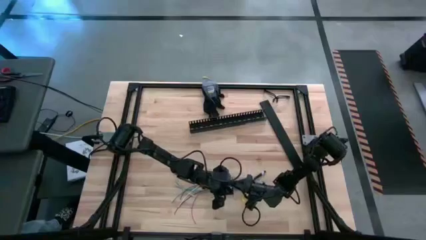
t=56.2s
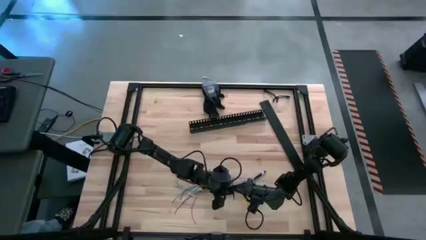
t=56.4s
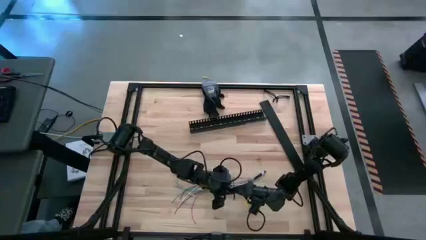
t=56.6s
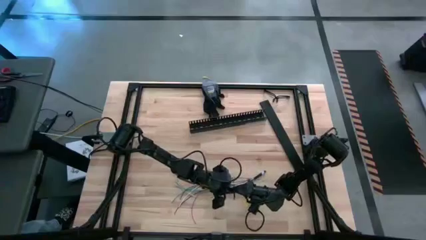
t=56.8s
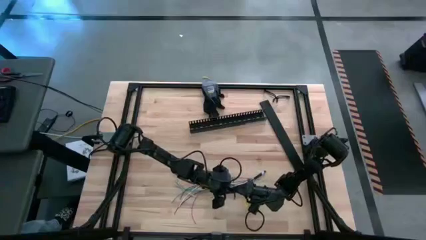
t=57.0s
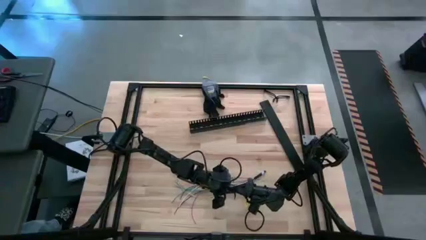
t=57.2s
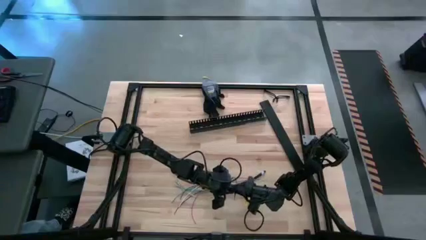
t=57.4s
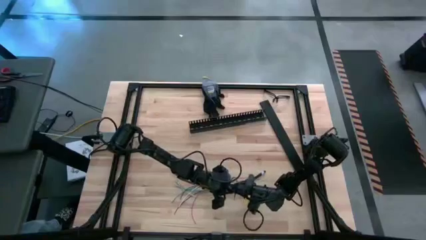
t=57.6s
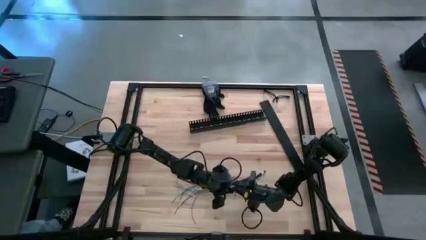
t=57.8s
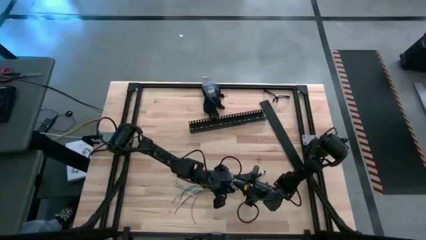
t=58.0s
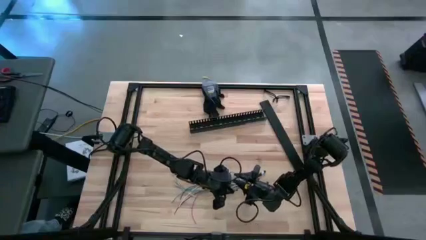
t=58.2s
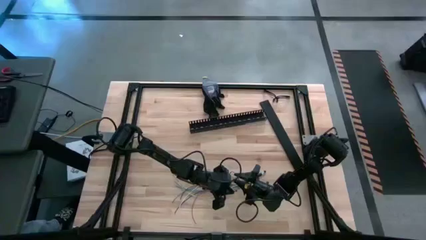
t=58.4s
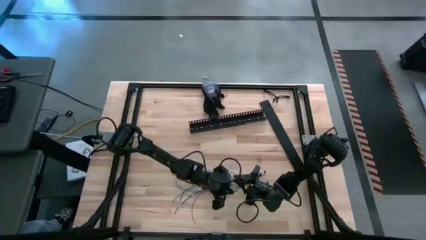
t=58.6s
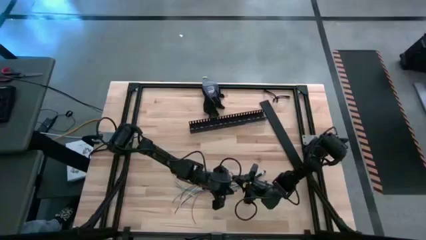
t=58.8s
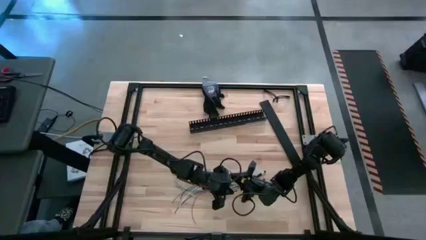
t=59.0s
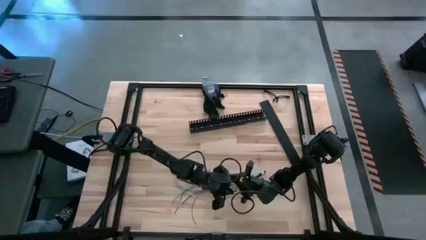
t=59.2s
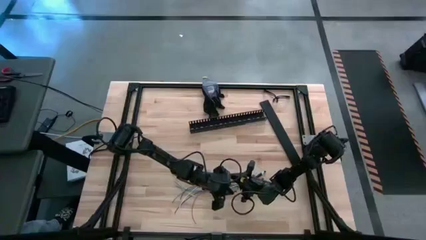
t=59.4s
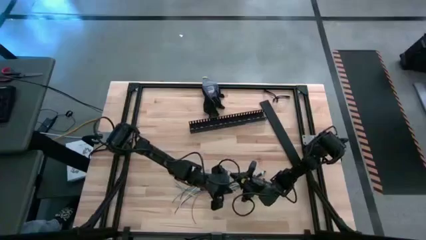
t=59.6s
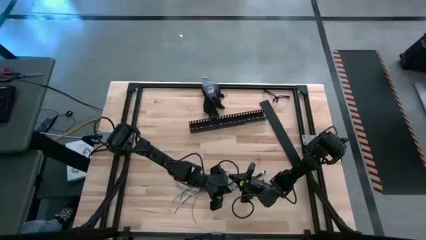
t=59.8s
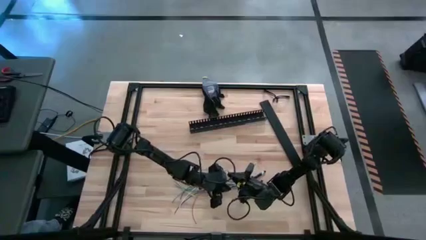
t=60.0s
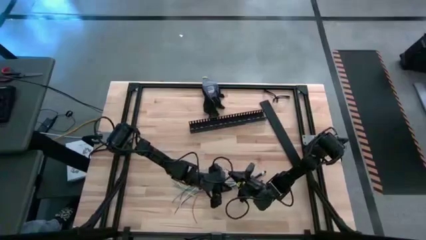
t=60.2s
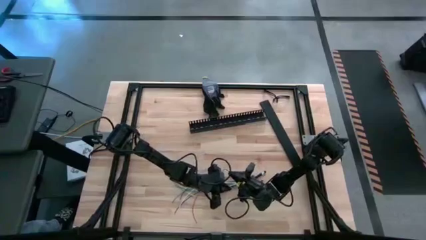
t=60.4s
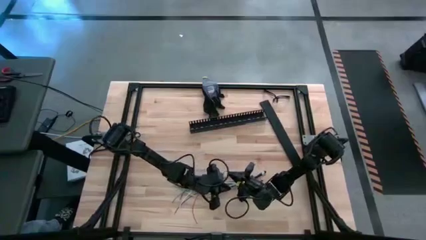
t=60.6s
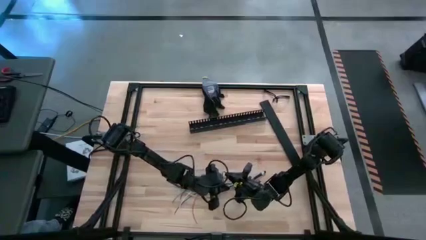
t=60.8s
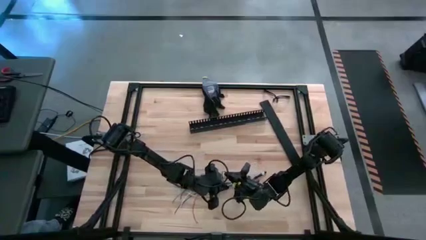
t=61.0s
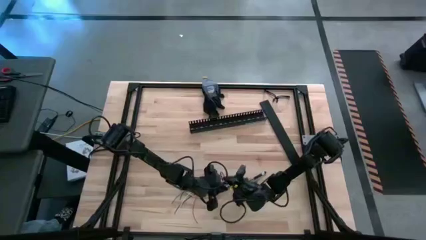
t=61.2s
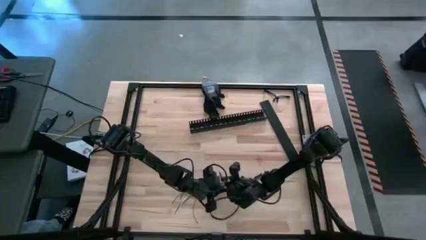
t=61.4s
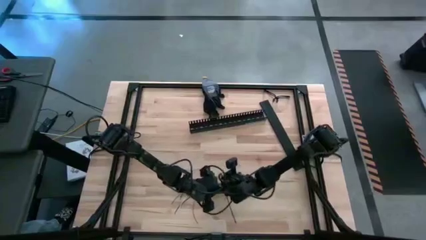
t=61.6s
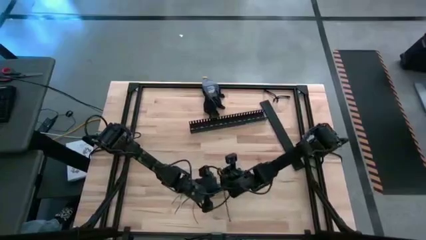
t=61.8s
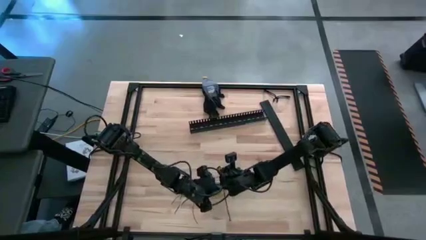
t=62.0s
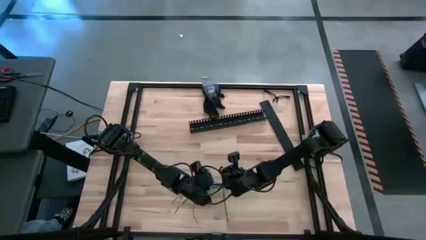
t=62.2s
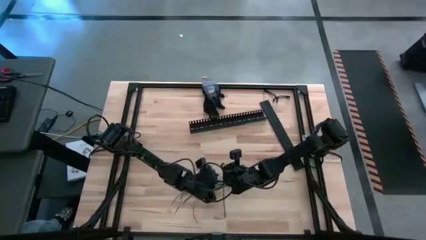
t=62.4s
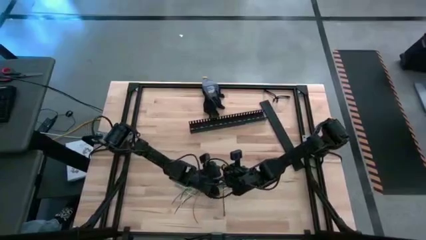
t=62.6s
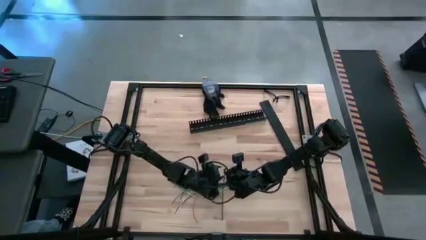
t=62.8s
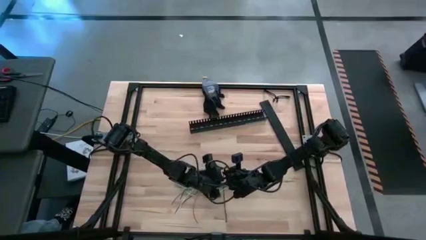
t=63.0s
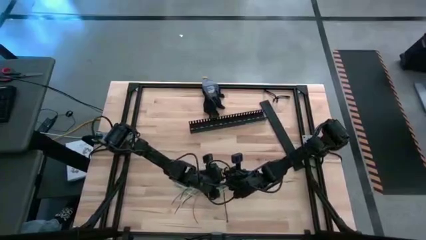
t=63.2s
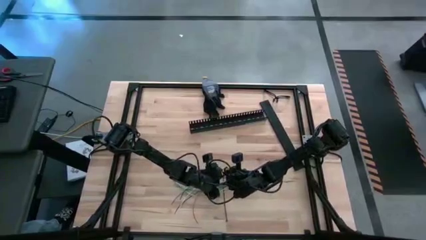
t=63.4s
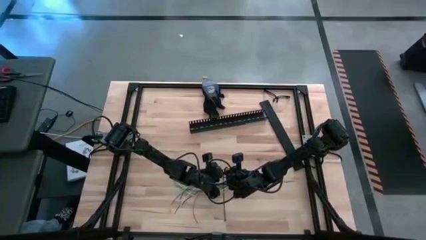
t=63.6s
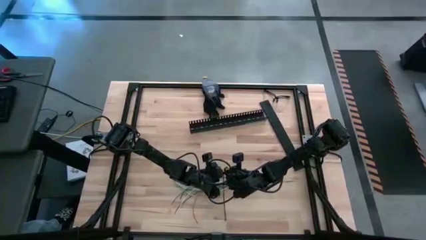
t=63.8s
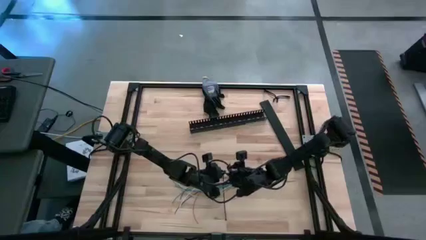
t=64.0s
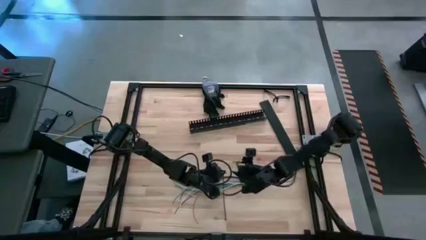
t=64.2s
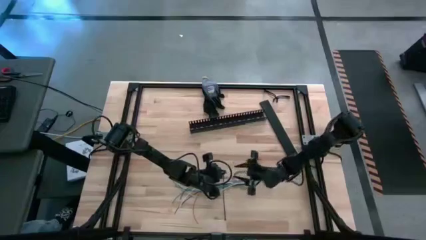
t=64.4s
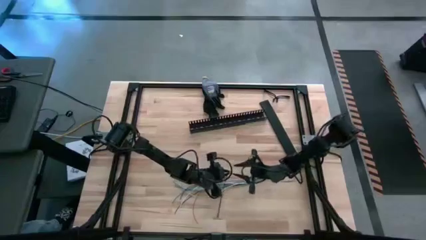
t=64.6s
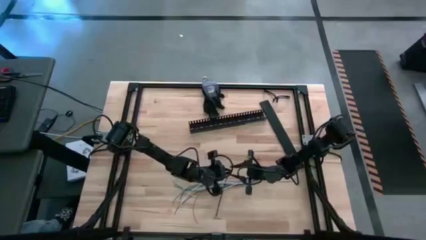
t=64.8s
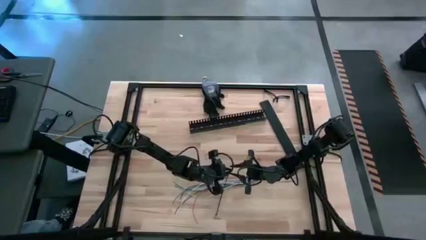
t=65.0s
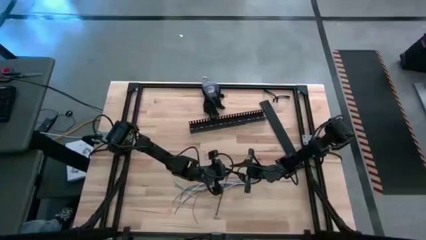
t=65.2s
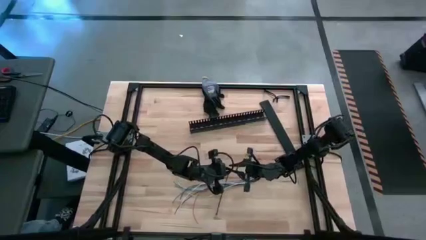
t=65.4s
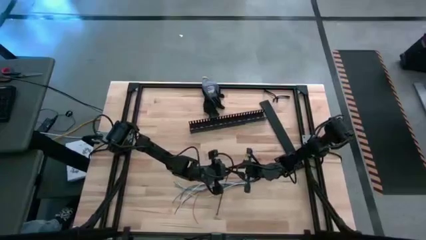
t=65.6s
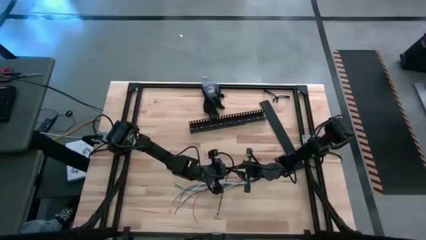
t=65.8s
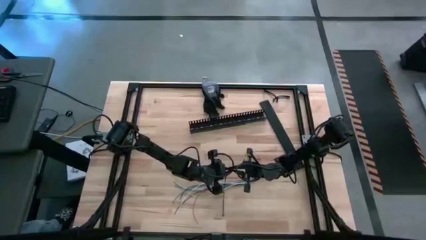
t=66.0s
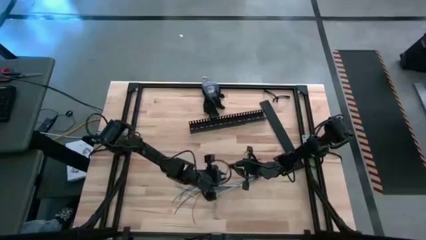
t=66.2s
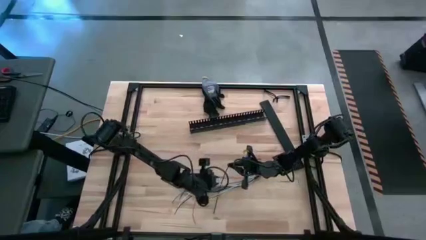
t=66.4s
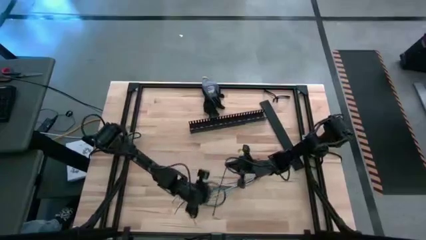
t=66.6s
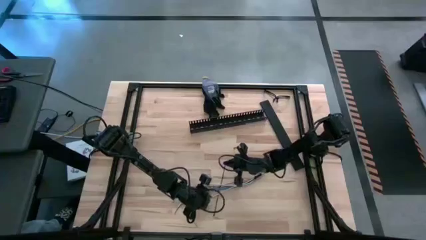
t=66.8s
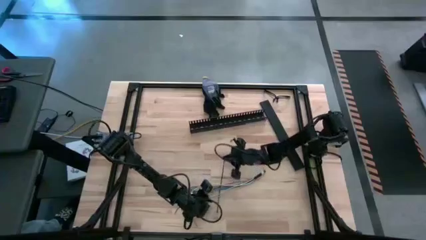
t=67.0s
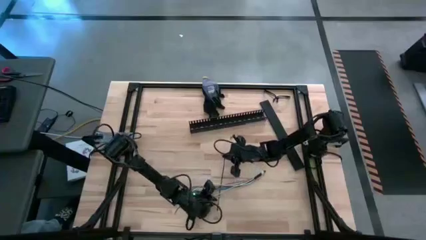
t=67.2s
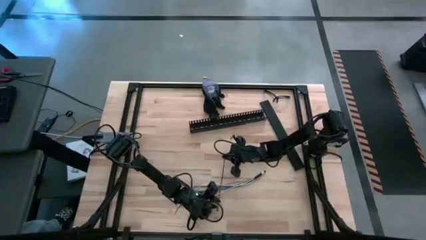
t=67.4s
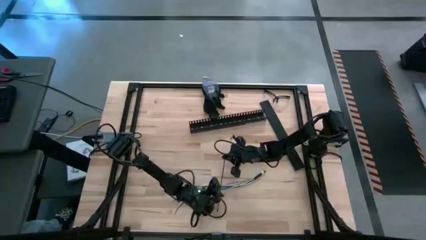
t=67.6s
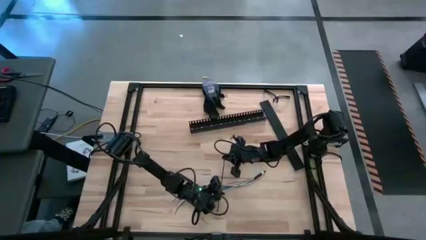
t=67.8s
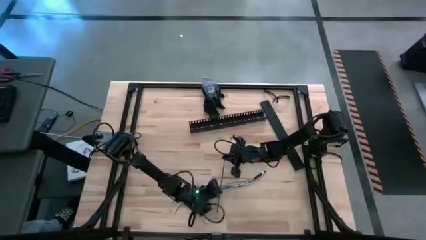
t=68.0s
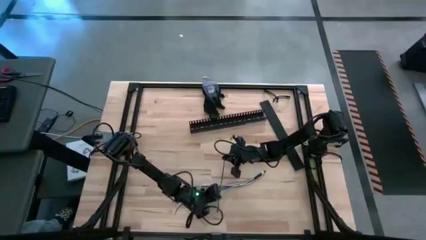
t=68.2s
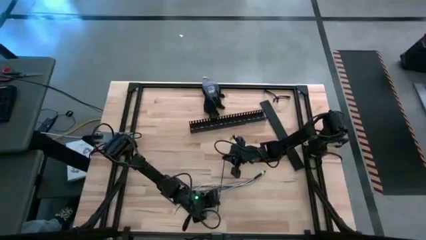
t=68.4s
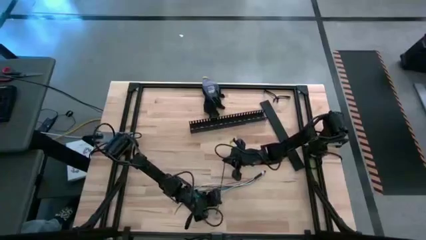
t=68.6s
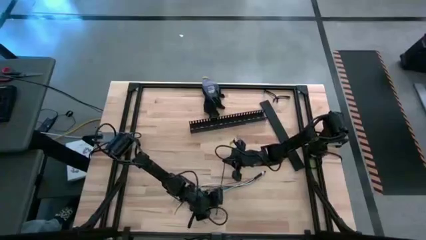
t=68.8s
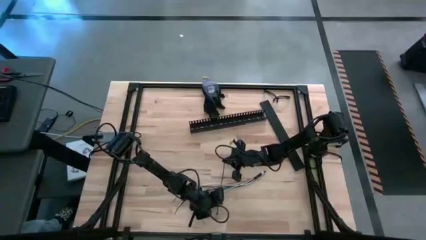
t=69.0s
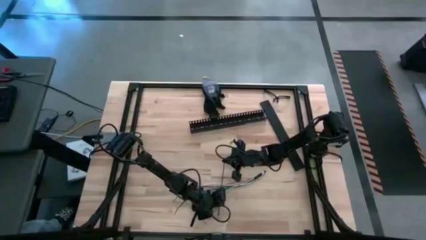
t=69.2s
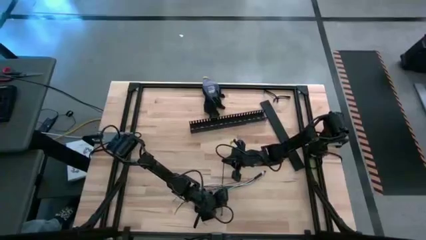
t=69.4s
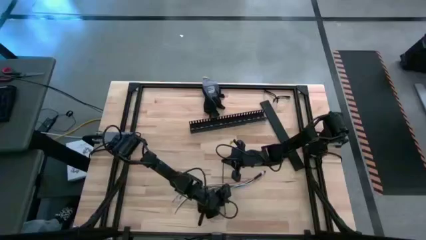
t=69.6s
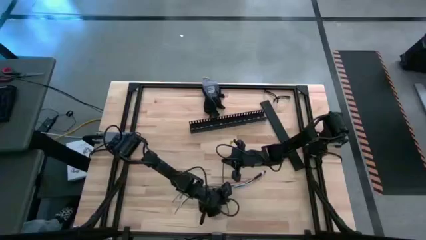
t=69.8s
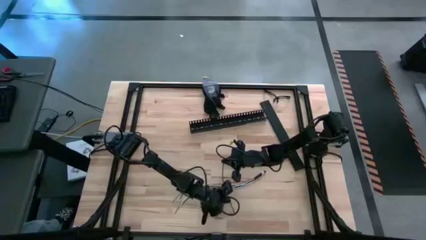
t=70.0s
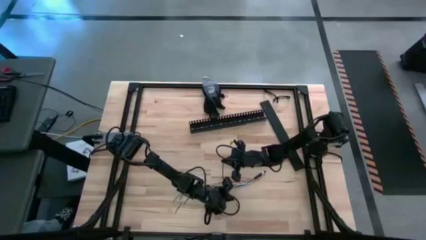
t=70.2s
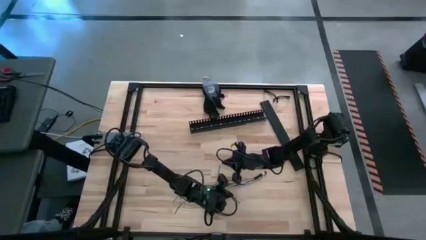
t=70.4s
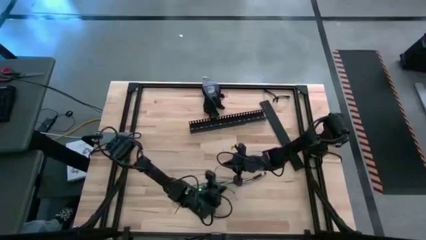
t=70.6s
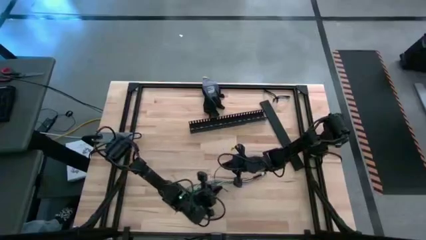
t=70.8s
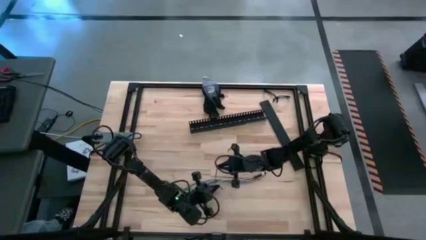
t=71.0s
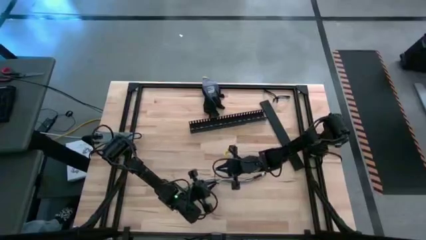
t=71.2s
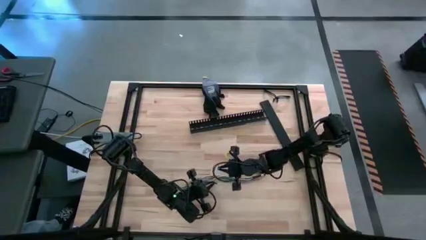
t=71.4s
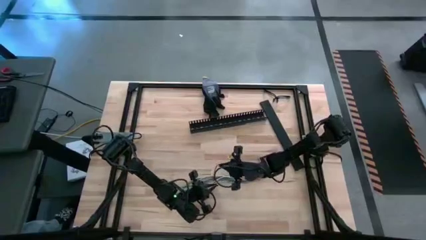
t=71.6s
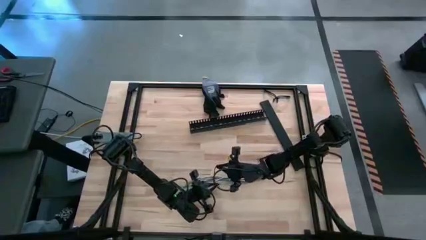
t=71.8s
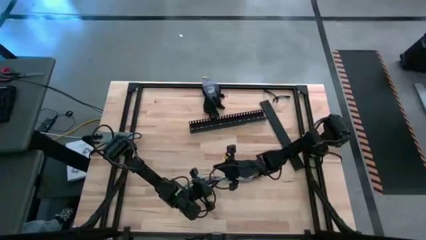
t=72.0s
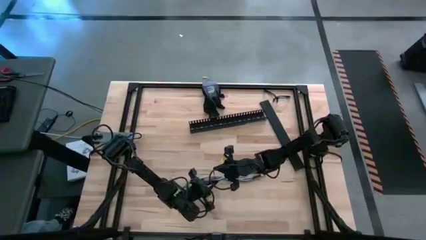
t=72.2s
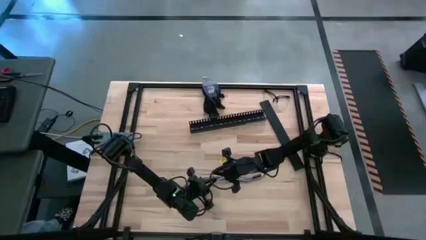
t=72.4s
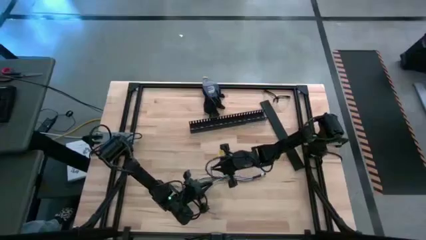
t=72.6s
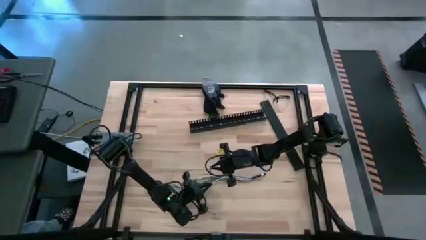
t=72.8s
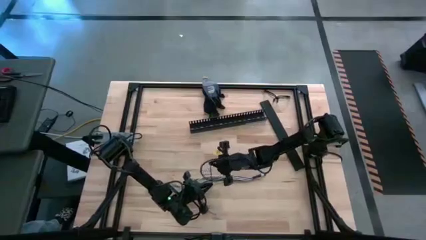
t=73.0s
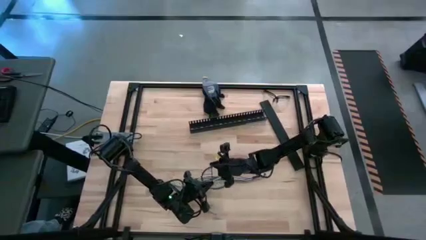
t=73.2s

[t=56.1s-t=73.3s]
Task: Ziptie cables
Wrap the colored loose cables with the black zip tie
